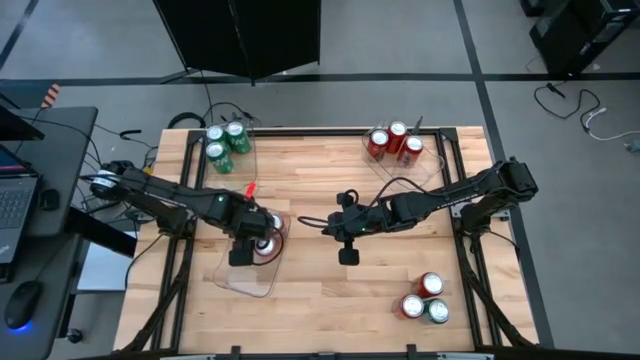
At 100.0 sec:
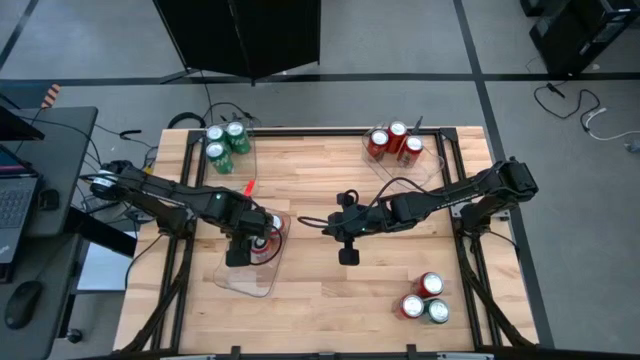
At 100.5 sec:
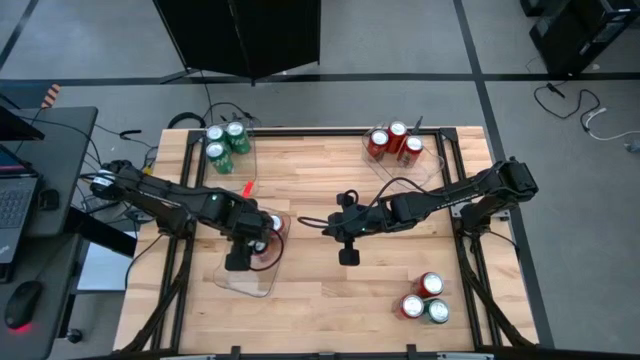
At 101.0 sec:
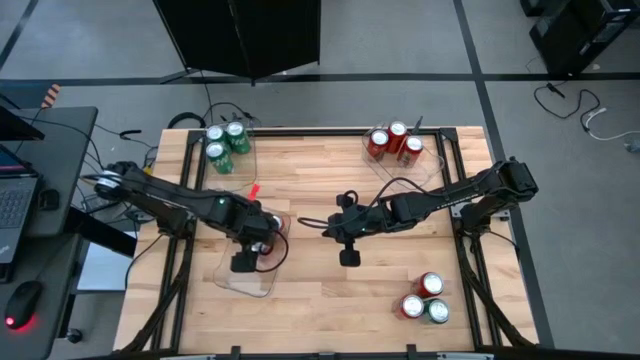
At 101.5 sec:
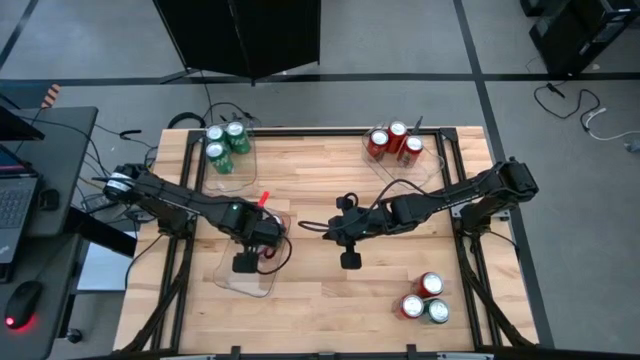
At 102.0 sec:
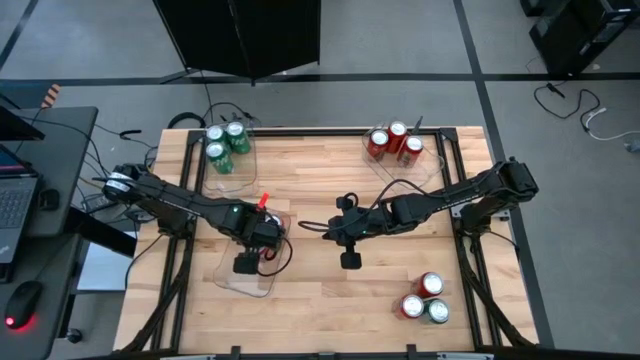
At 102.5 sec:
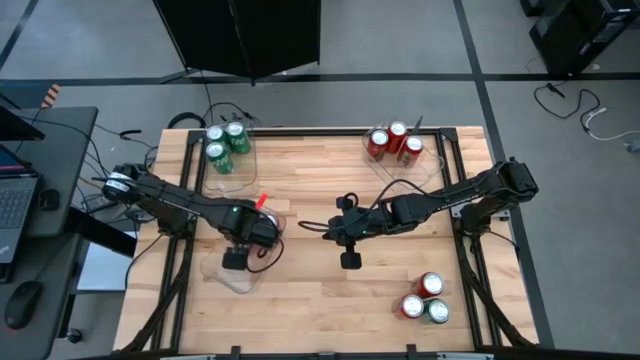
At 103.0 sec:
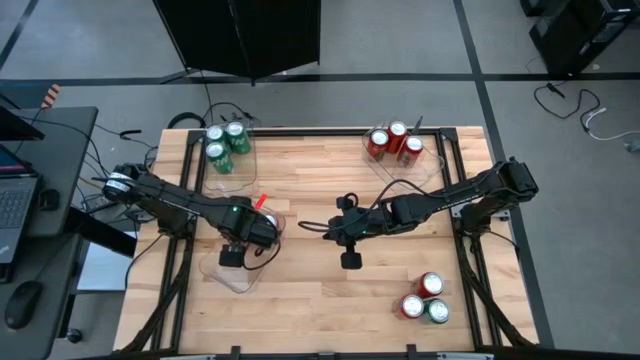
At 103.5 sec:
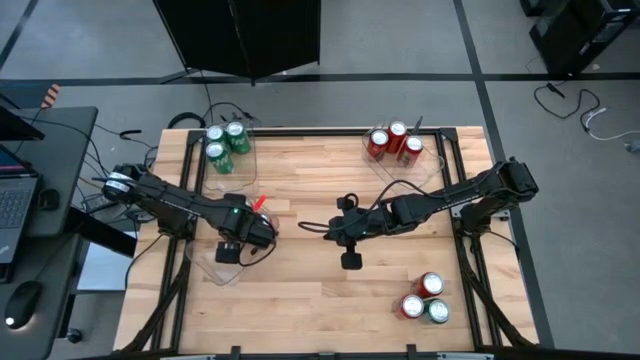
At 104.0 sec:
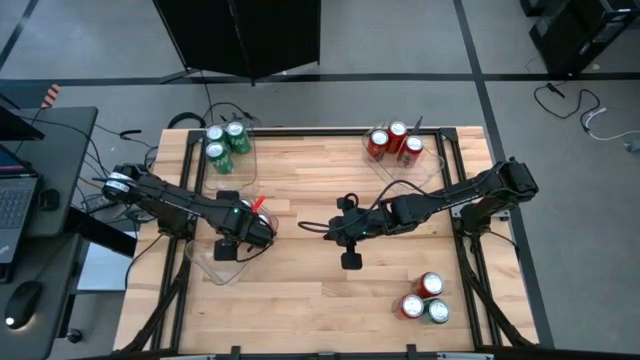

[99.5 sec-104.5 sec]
Task: Sort soda cans
Adjust the red soda can in the transparent bin

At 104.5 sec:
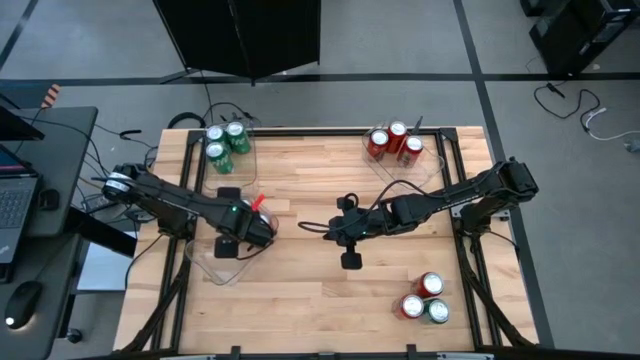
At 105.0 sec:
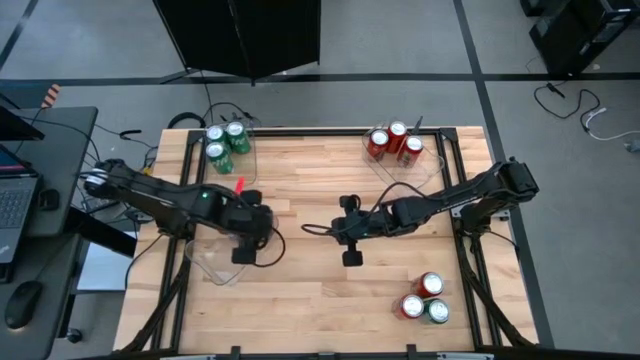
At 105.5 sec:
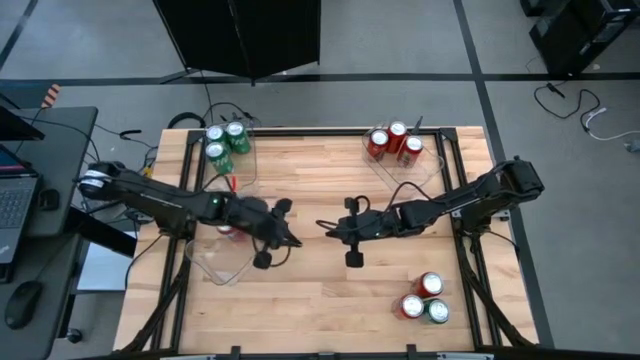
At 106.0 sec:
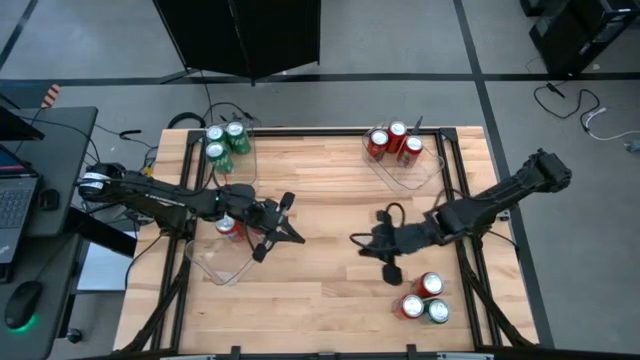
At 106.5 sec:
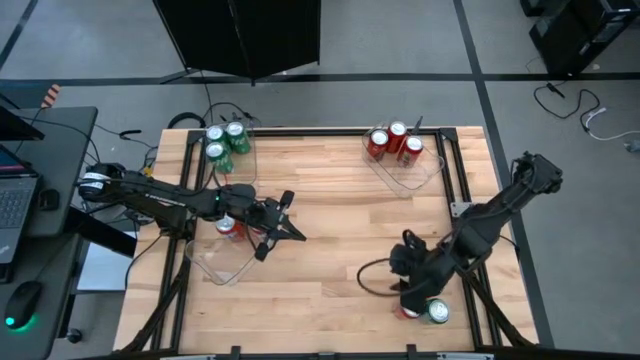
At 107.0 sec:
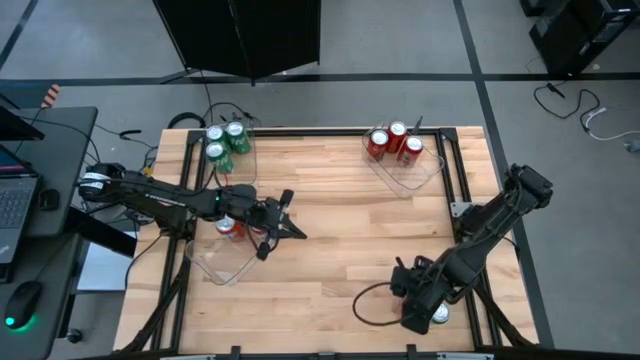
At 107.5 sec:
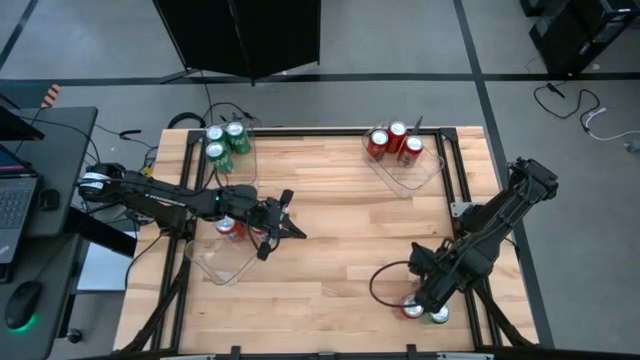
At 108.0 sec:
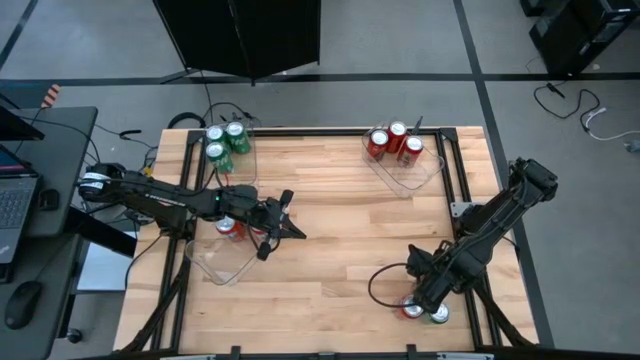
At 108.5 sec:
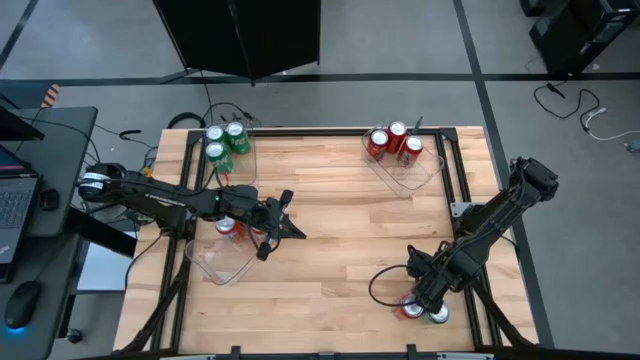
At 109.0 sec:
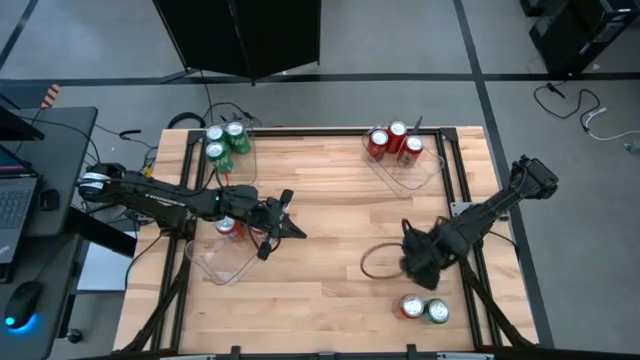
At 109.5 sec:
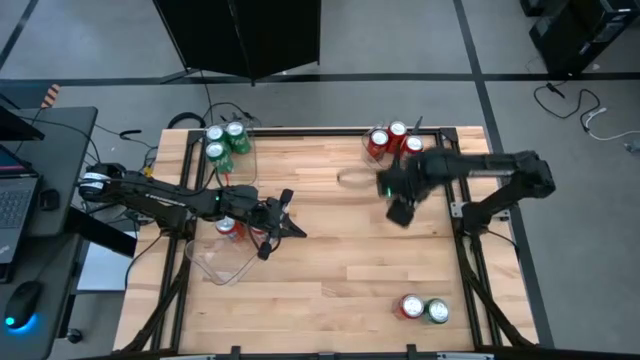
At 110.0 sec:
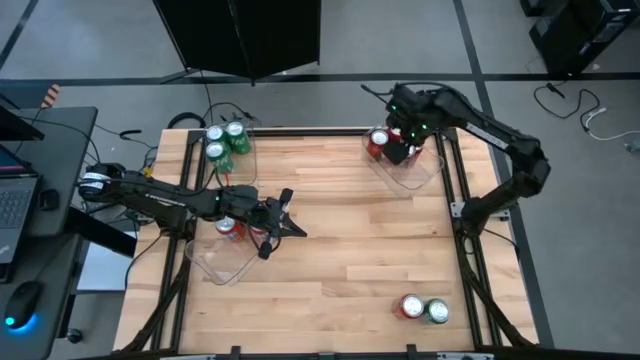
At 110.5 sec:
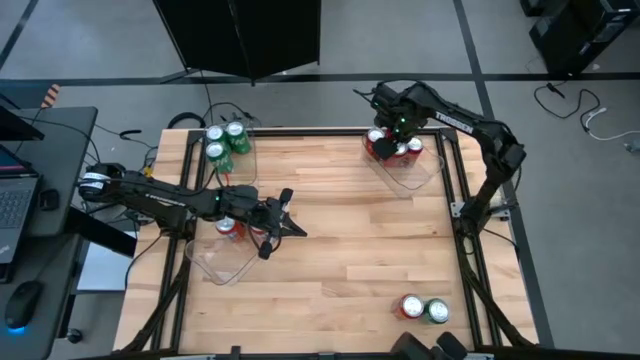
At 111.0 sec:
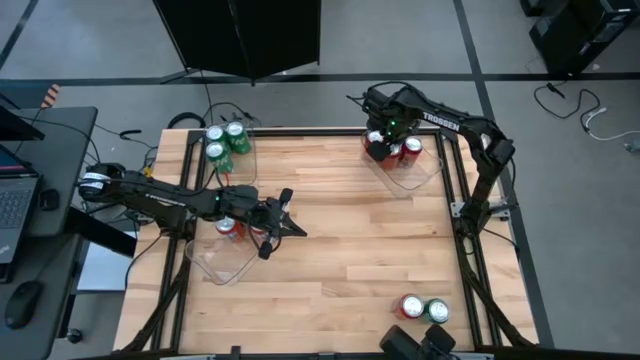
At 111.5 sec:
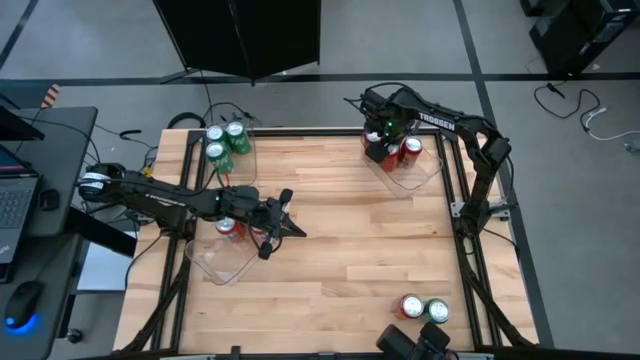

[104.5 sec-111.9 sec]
Put the red and black soda can into the top right transparent bin

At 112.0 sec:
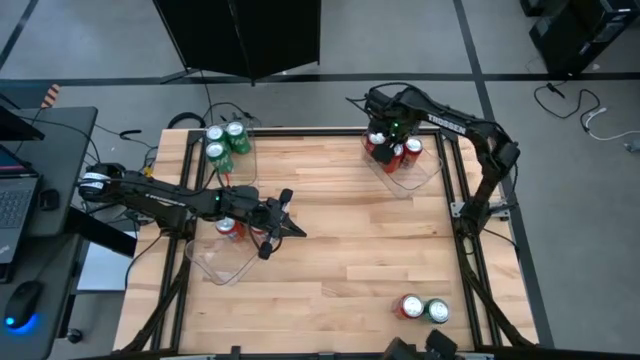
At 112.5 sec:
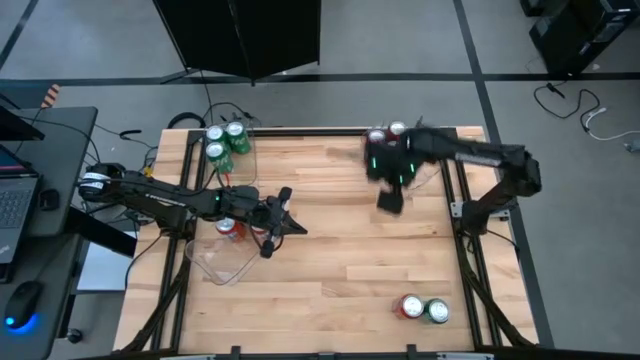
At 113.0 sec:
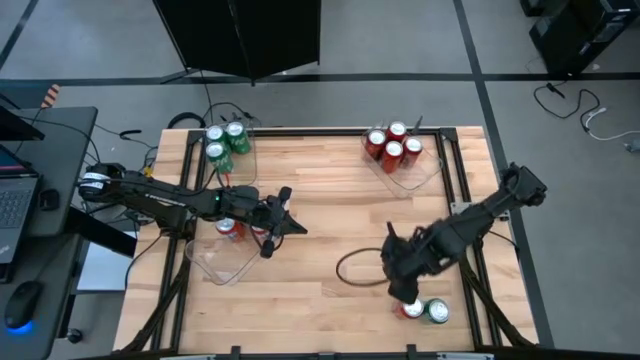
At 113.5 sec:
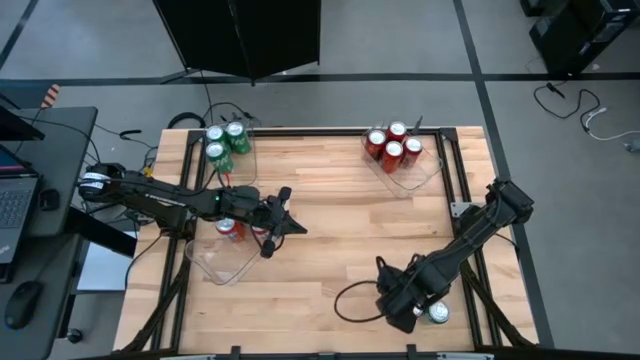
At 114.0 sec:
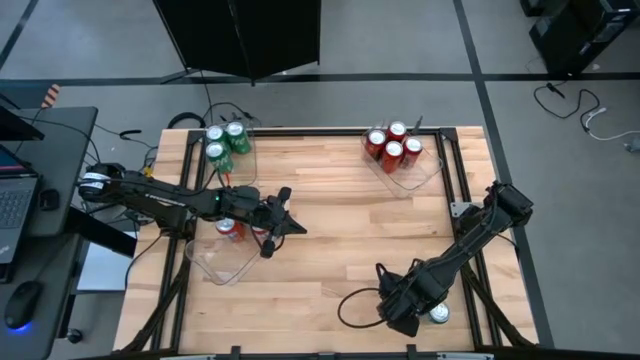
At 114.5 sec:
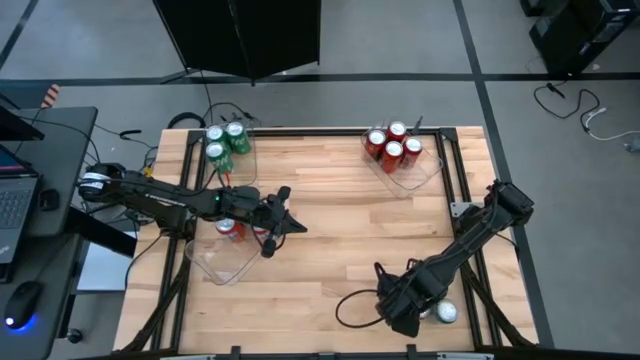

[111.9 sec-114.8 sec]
Move the red soda can to the center

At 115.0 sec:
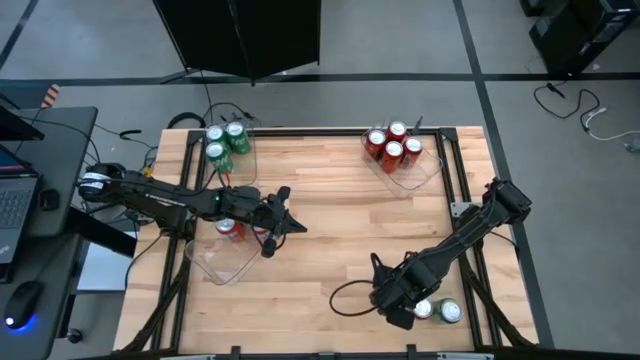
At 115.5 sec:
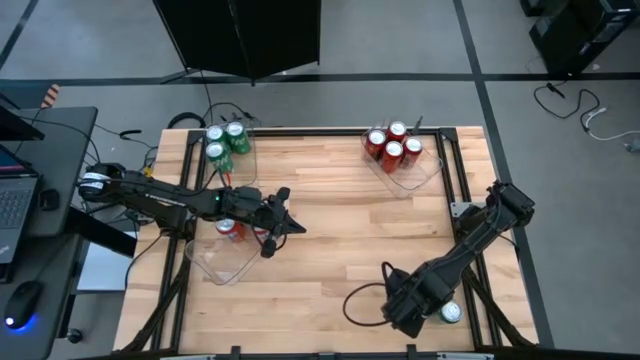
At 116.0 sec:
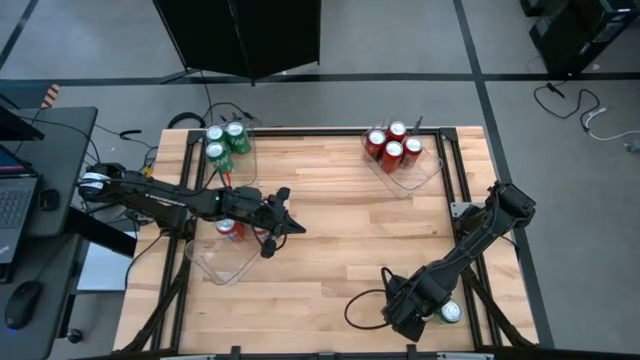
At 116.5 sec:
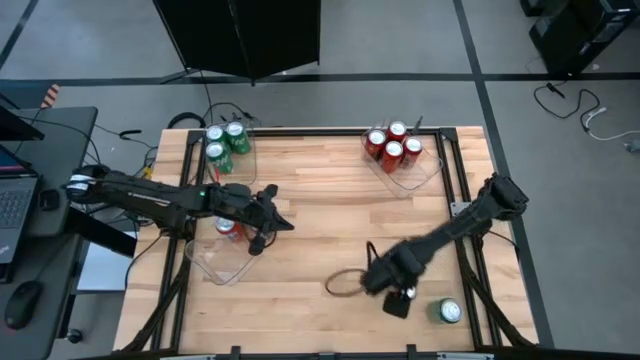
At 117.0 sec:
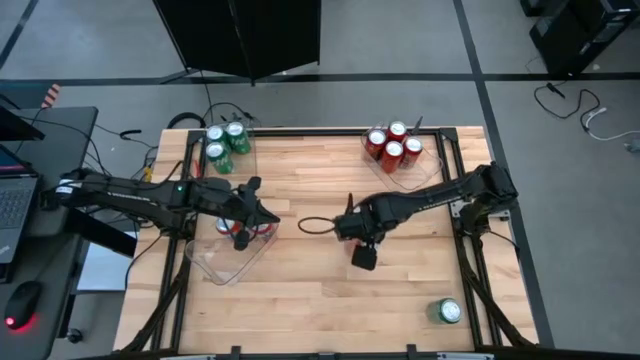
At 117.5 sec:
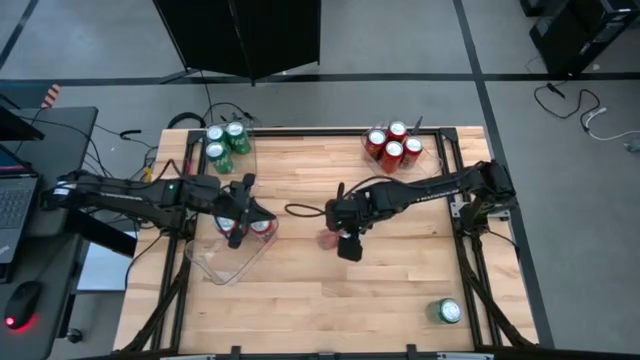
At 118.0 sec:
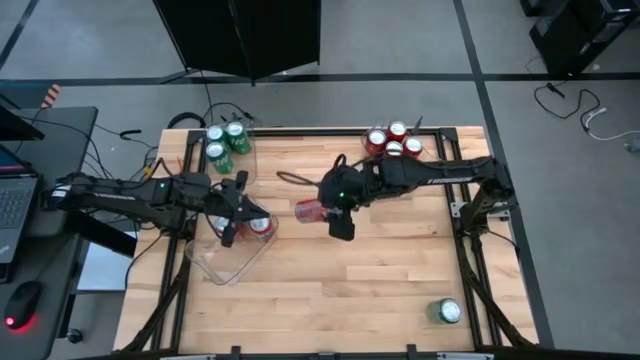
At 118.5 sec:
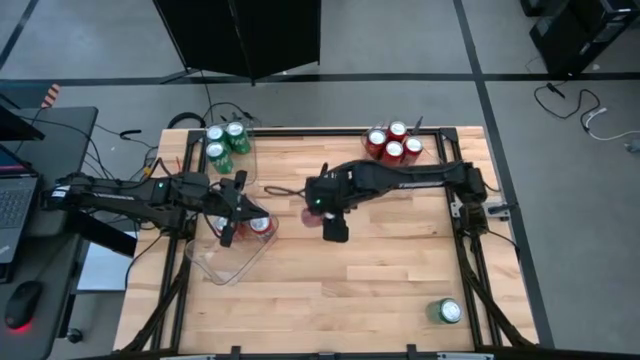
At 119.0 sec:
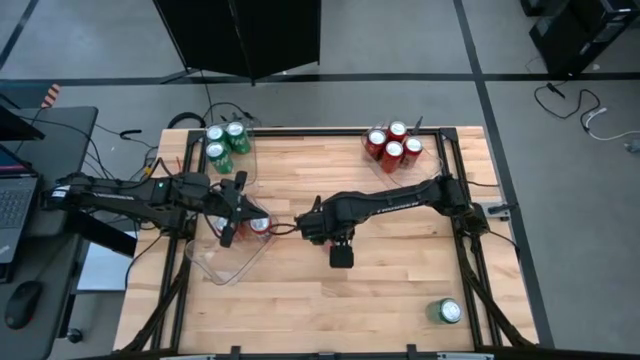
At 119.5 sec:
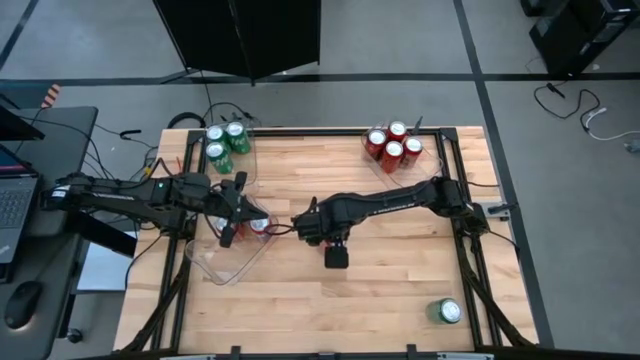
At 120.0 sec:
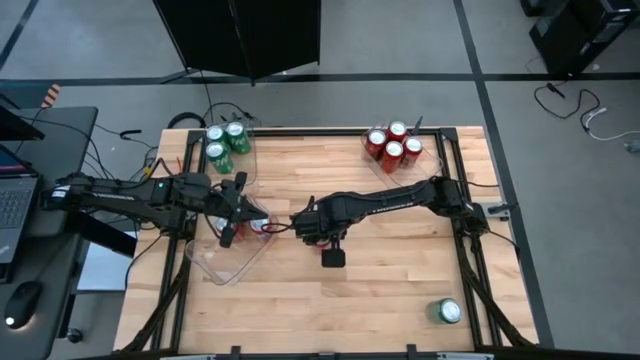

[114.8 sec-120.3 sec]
Move the red soda can to the center
